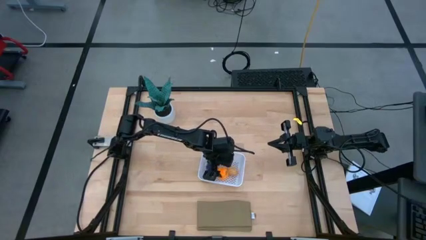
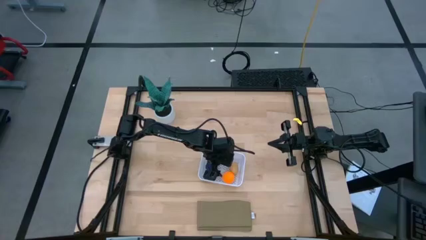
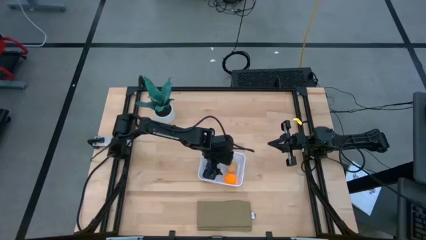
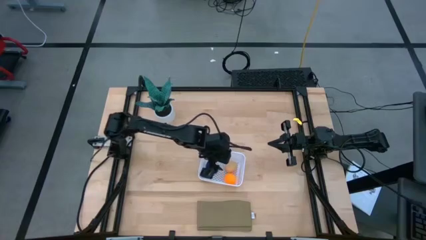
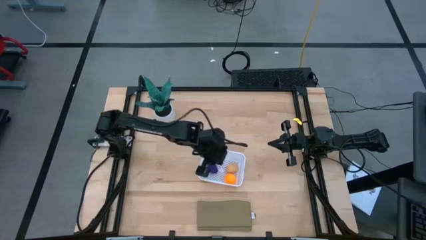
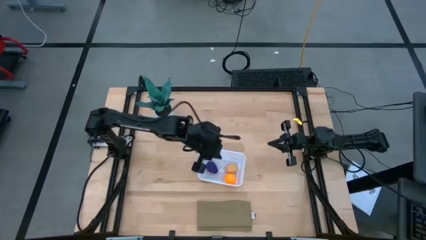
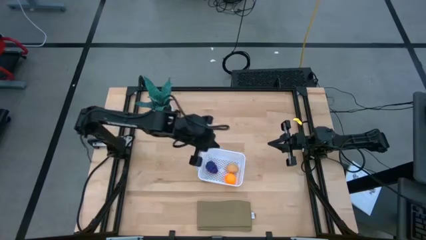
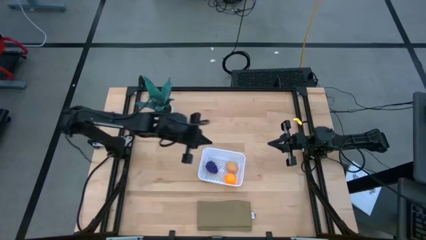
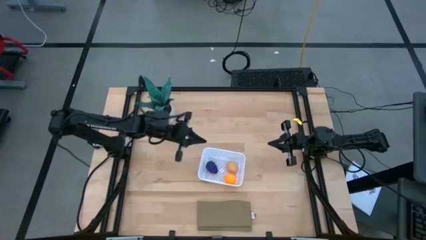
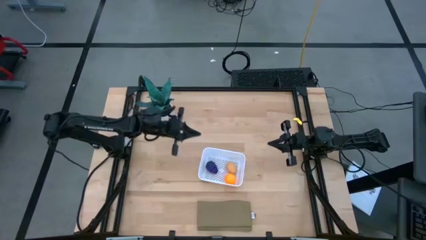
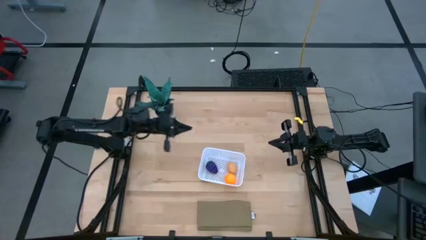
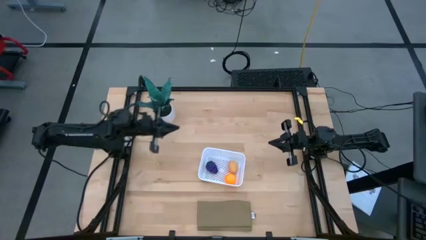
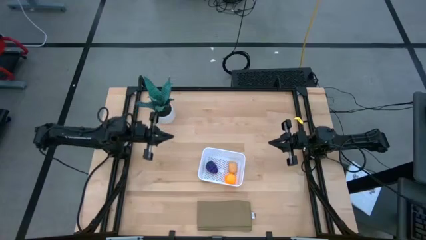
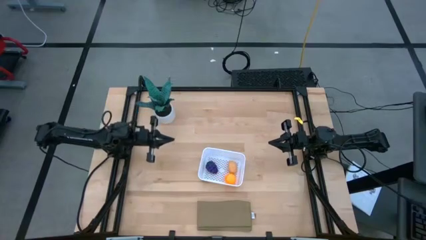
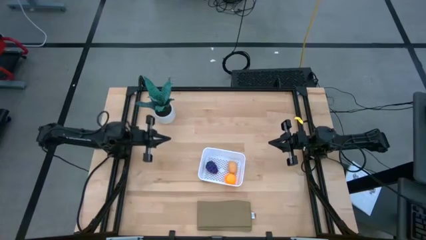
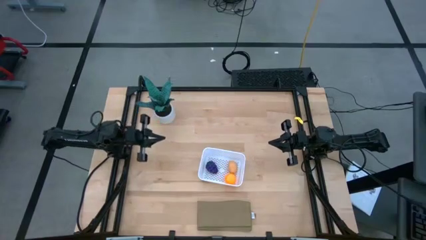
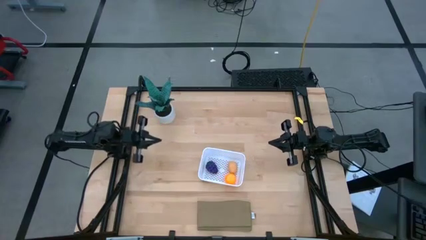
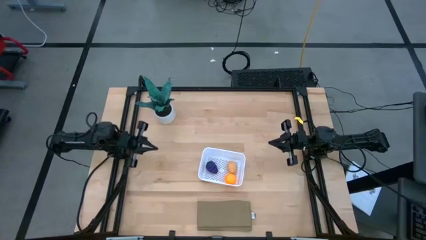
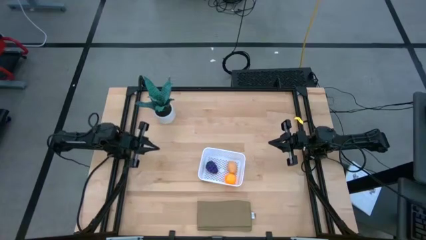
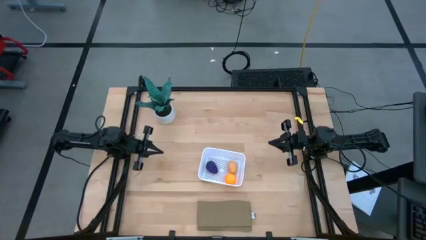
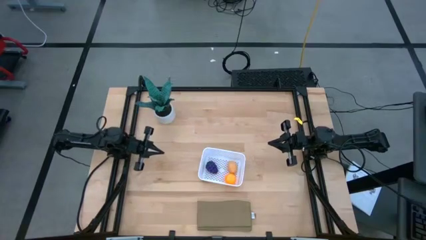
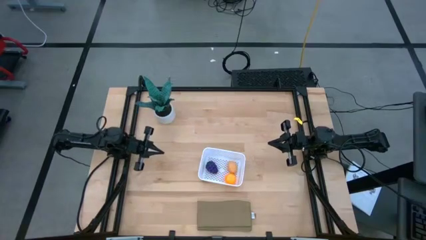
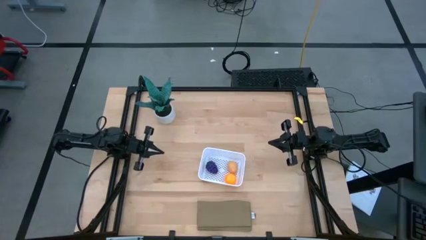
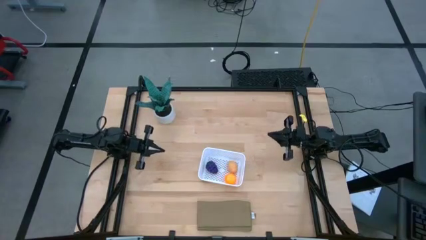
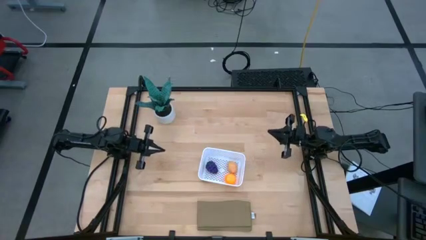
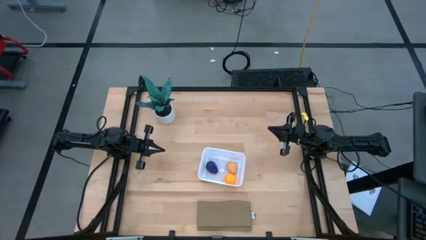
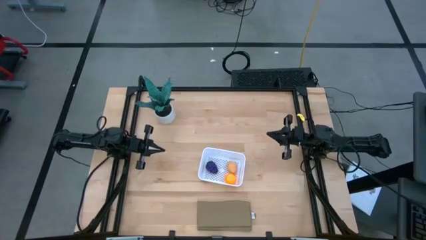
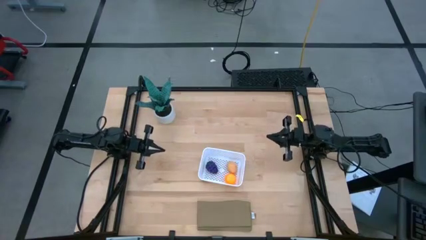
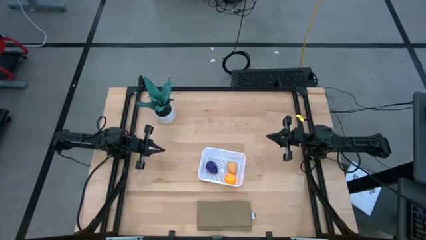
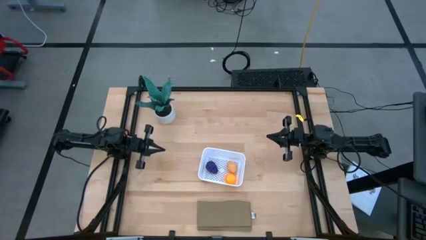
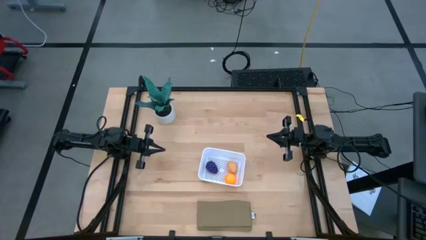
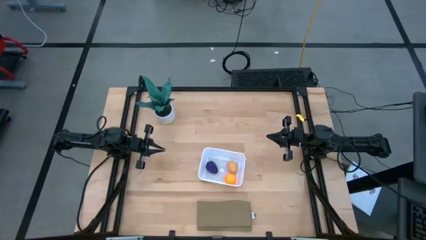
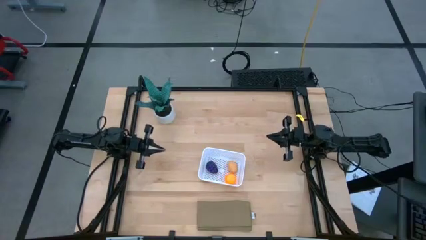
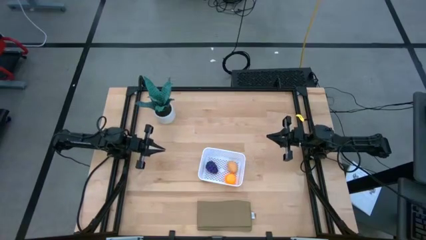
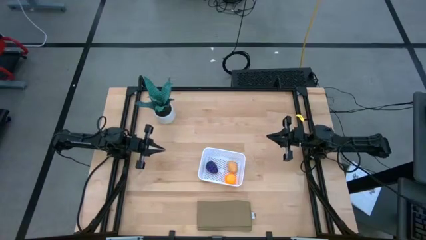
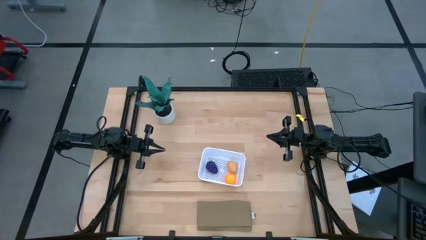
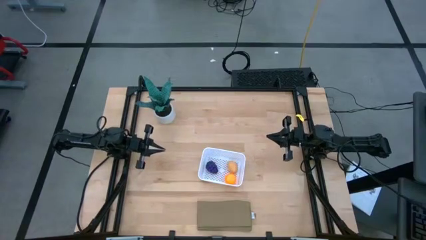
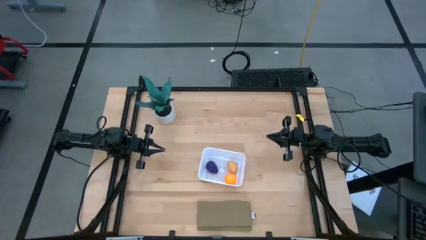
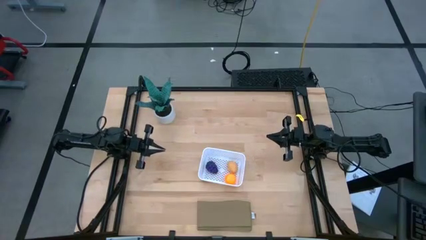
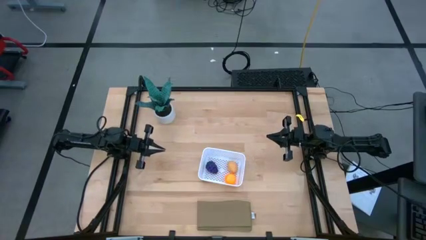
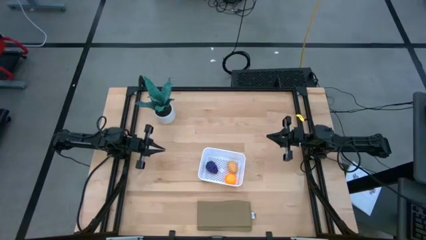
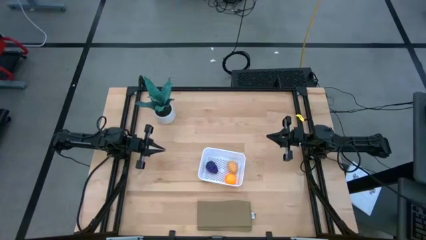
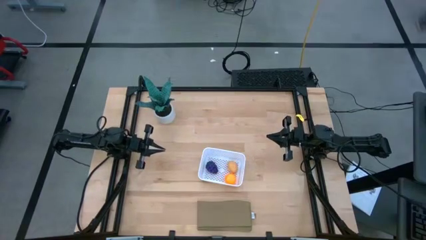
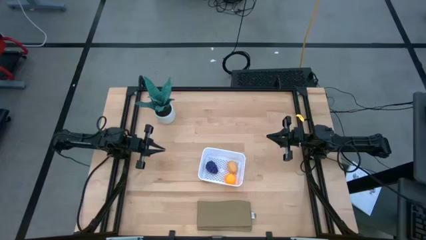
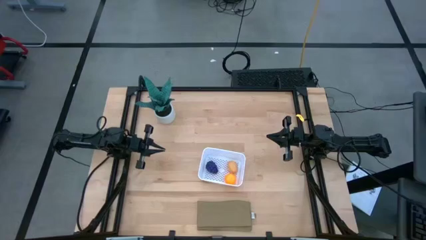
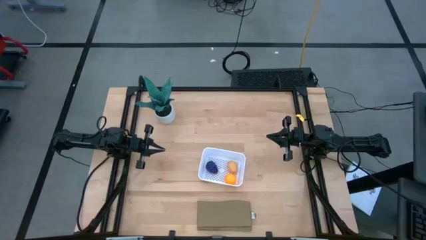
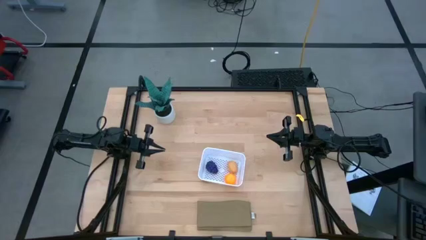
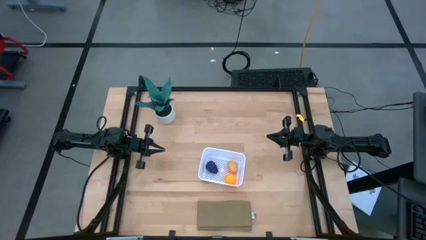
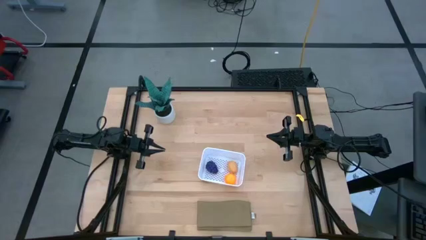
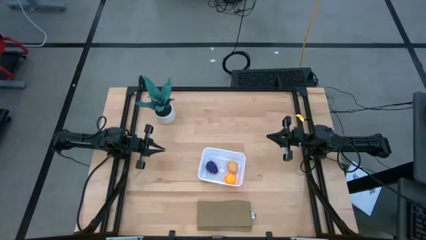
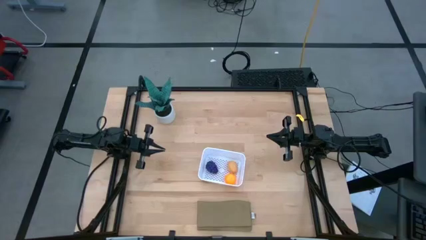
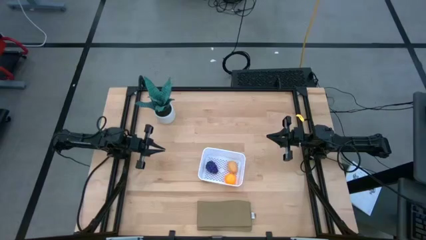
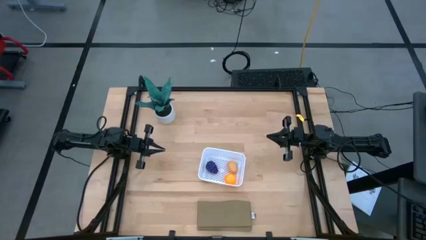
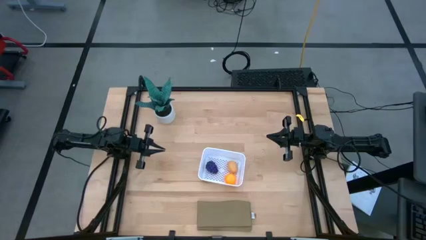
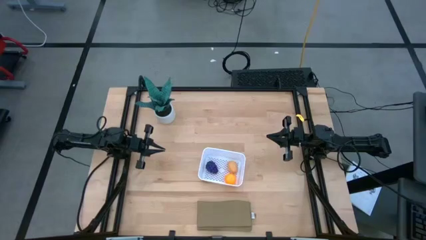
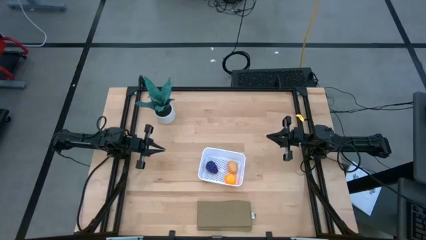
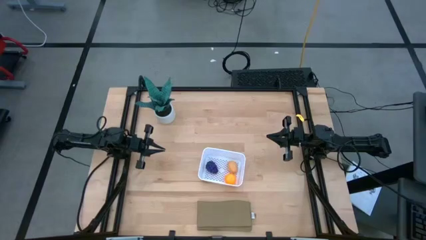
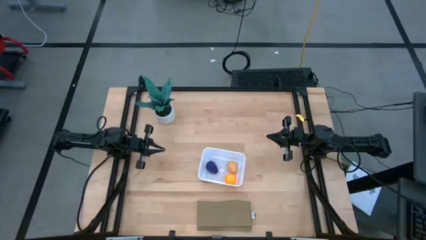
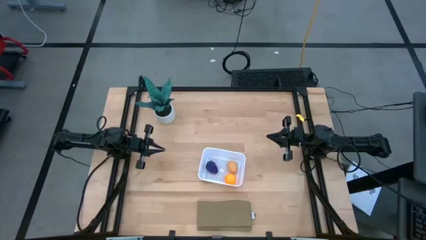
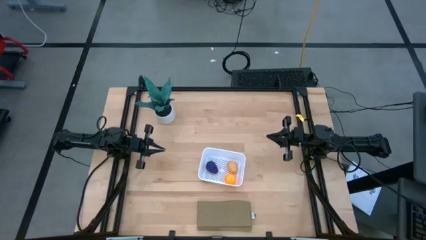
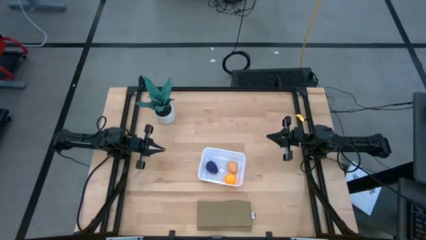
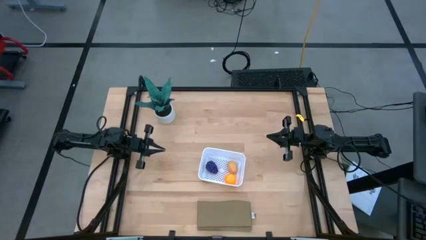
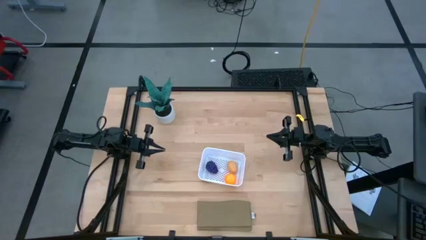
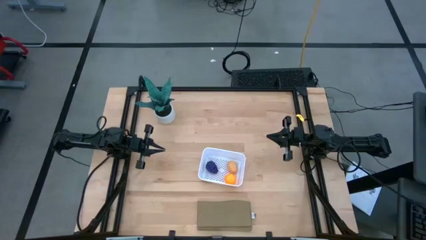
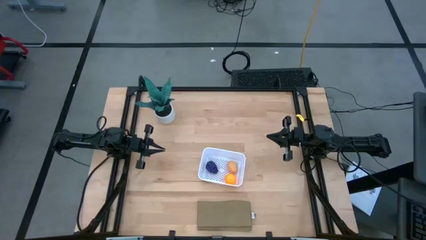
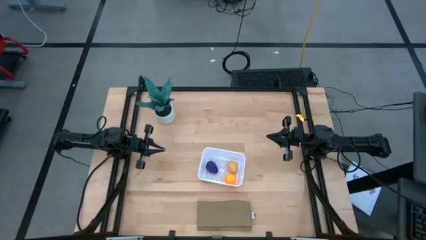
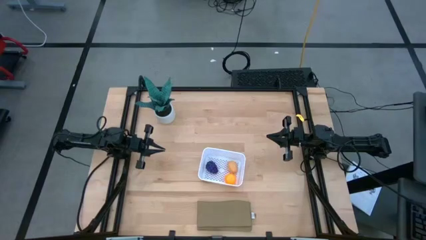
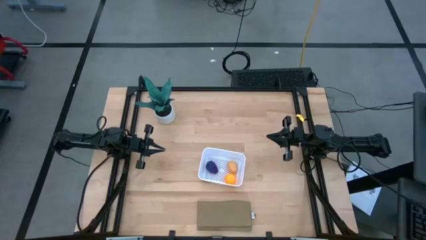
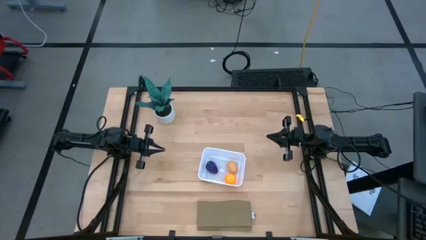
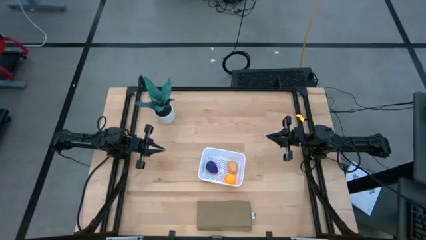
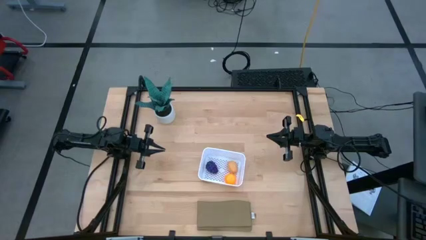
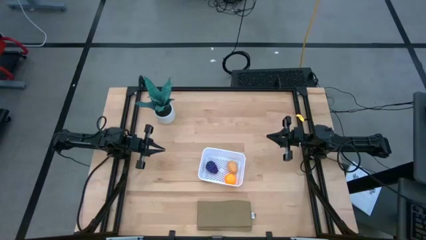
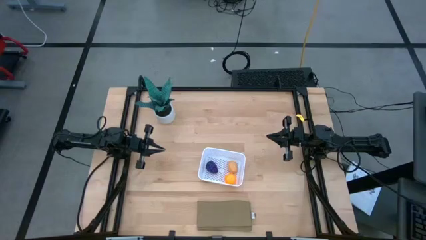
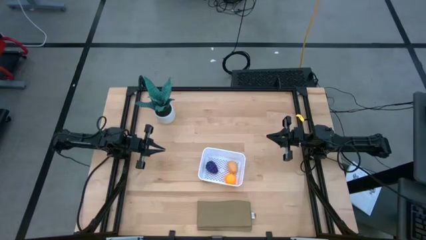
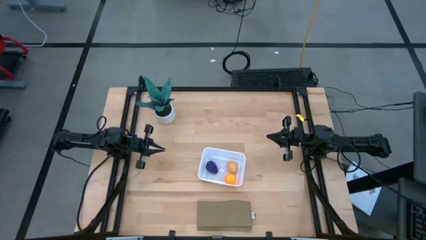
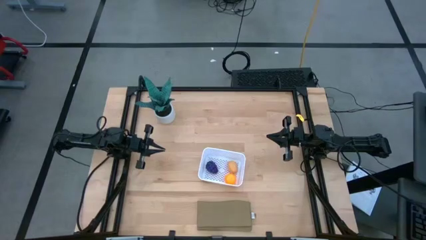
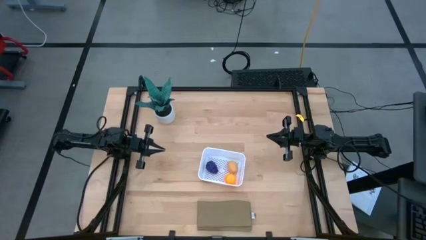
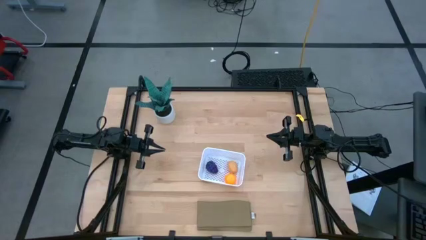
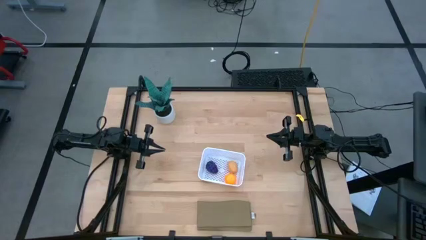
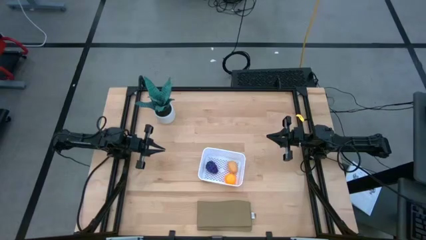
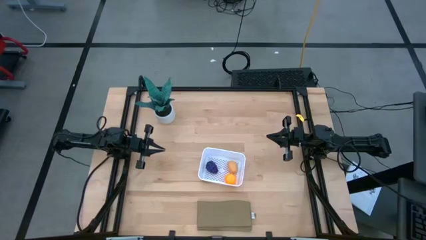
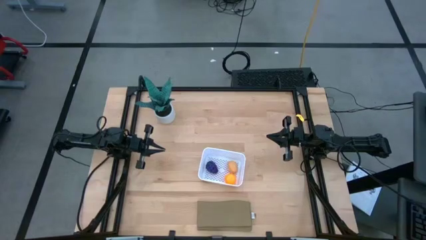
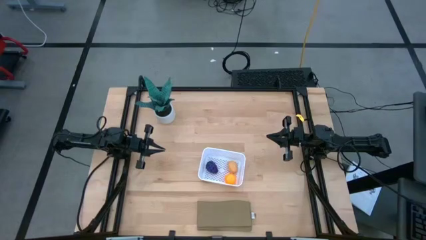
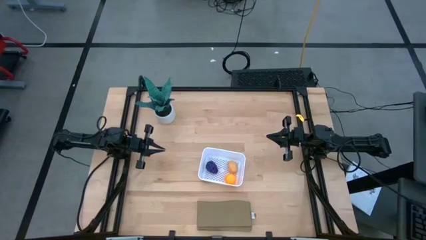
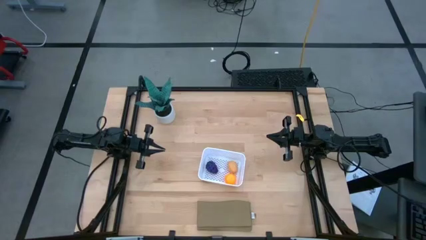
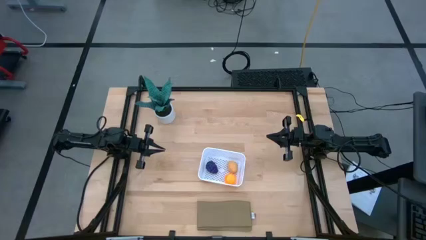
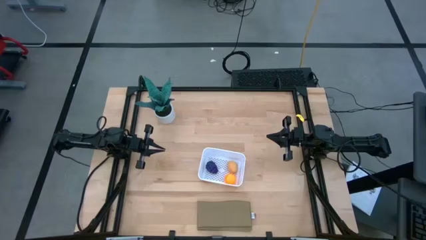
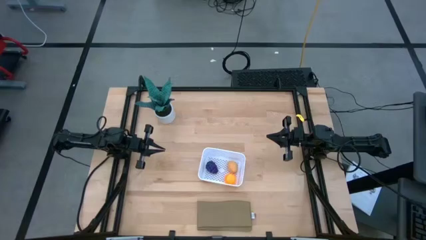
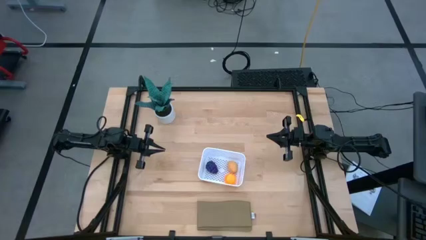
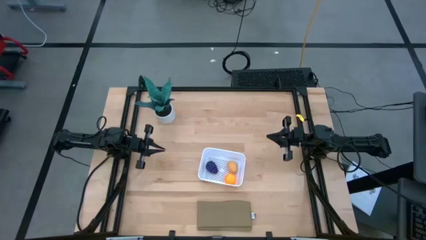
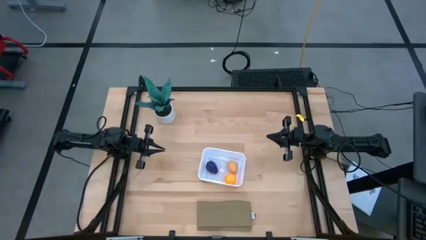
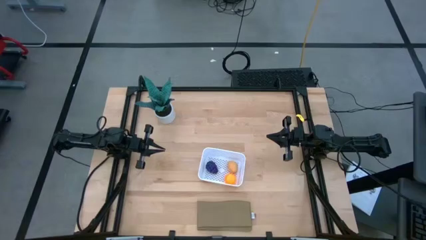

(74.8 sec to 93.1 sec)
Task: Pick and placing Produce into tupperware
Return to Home Position
